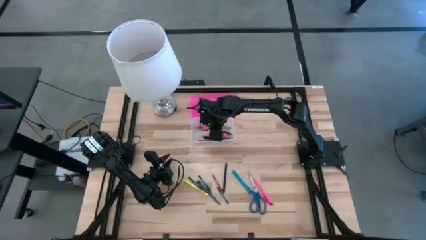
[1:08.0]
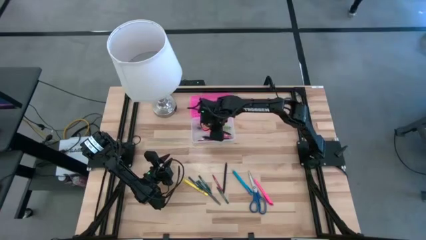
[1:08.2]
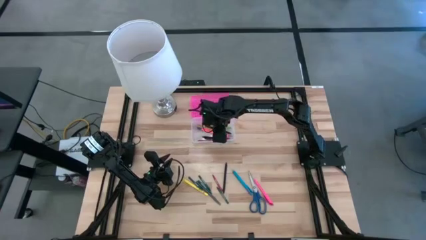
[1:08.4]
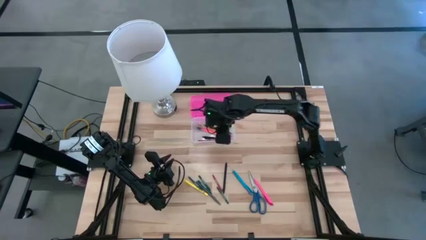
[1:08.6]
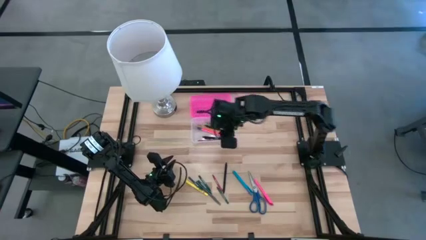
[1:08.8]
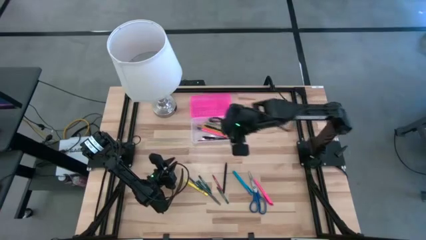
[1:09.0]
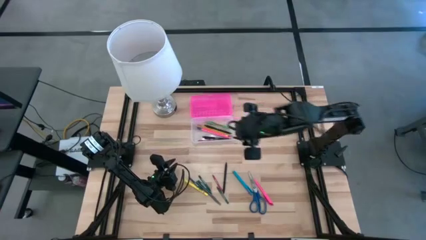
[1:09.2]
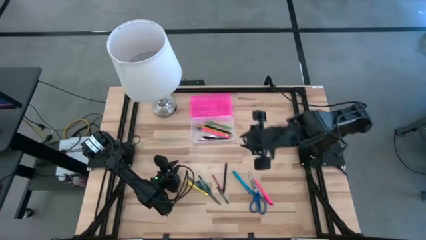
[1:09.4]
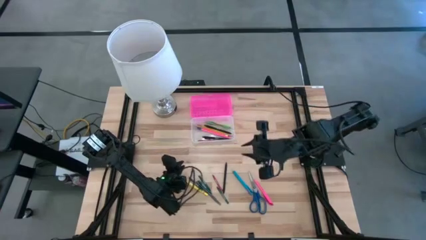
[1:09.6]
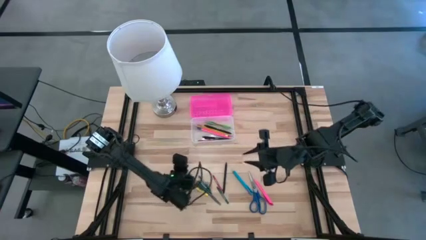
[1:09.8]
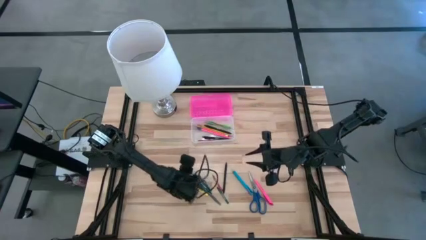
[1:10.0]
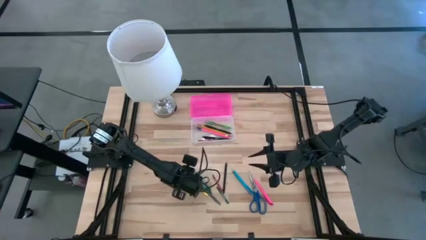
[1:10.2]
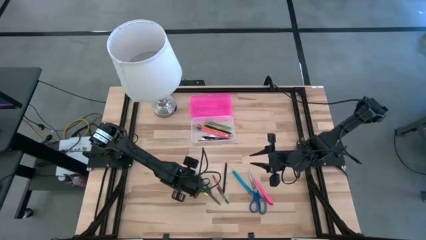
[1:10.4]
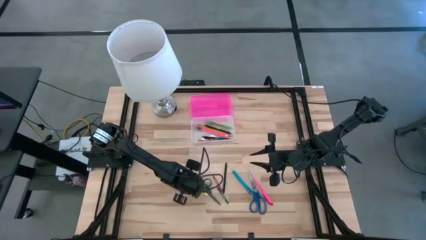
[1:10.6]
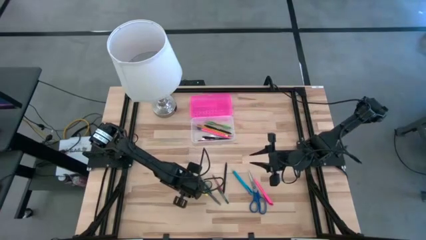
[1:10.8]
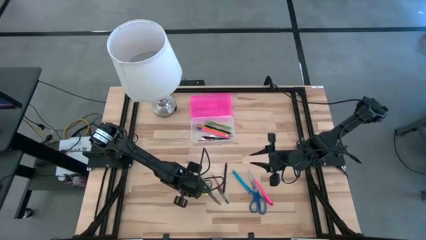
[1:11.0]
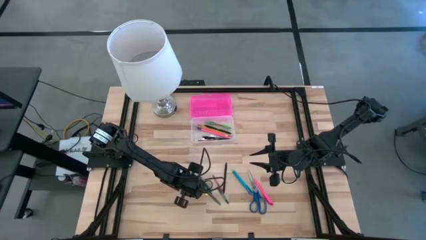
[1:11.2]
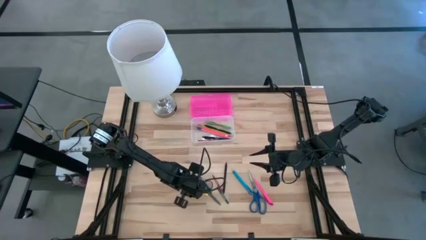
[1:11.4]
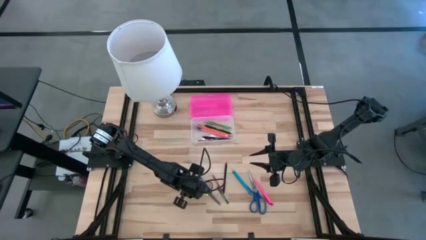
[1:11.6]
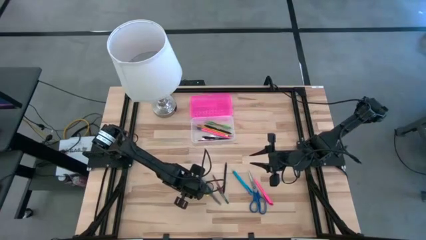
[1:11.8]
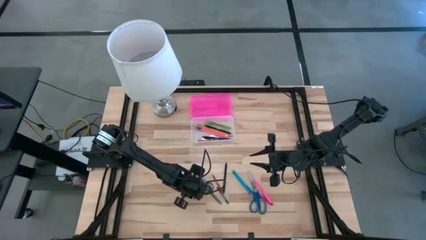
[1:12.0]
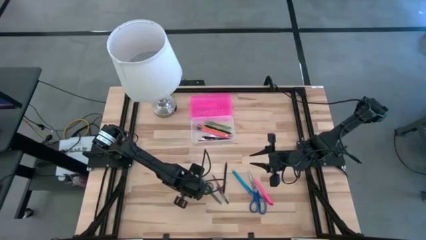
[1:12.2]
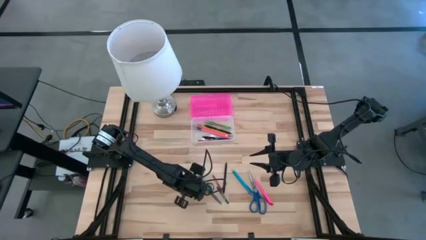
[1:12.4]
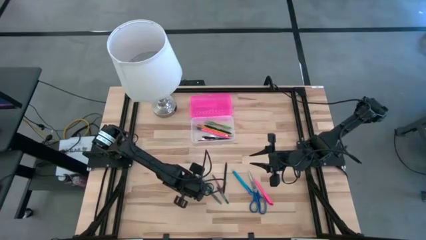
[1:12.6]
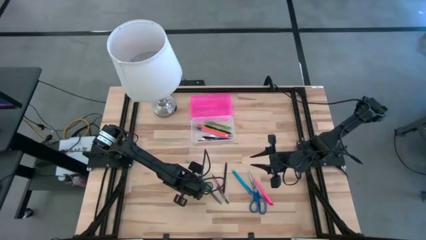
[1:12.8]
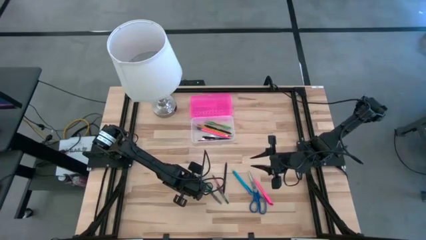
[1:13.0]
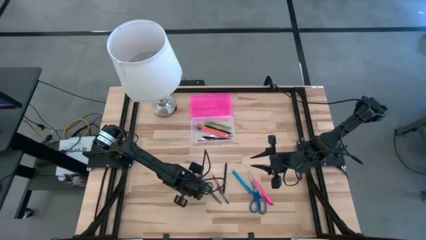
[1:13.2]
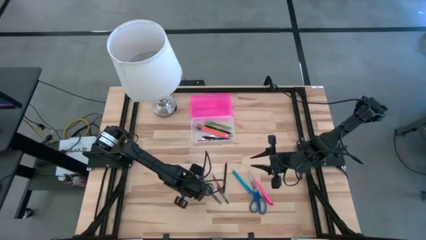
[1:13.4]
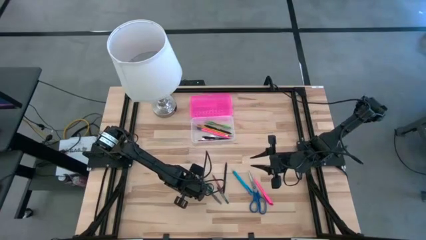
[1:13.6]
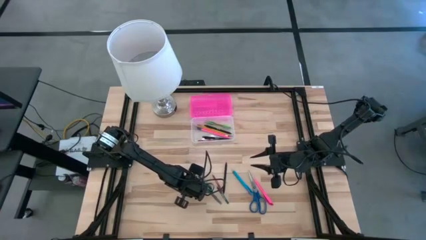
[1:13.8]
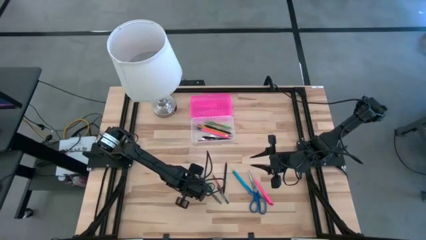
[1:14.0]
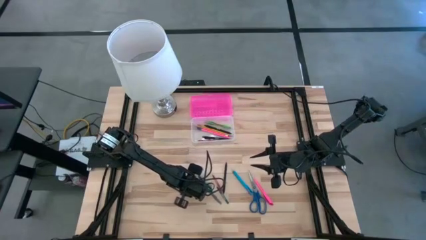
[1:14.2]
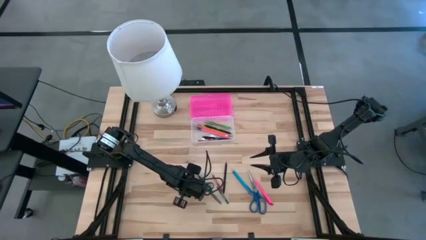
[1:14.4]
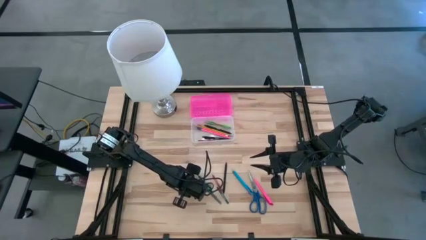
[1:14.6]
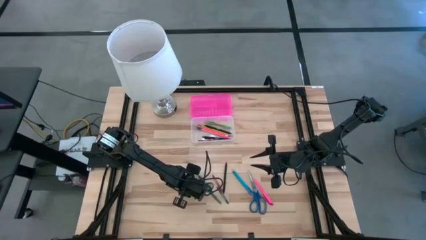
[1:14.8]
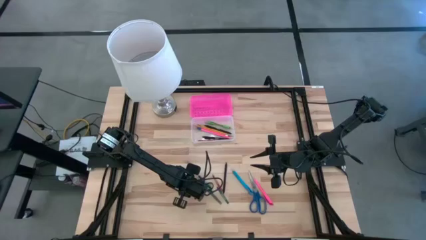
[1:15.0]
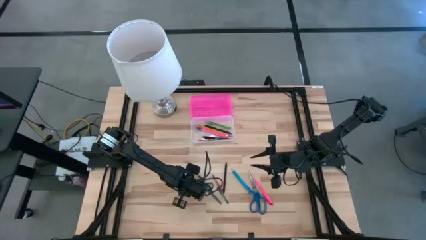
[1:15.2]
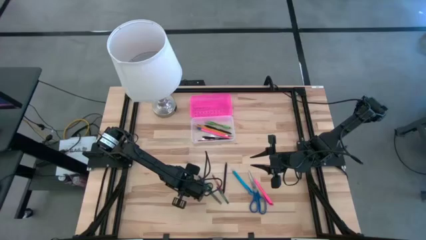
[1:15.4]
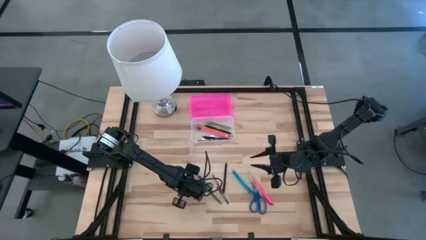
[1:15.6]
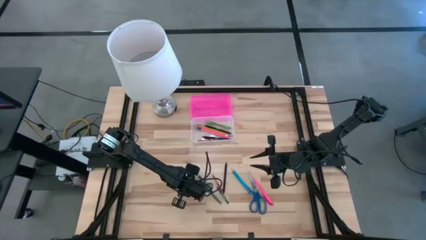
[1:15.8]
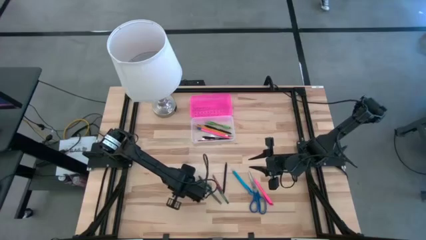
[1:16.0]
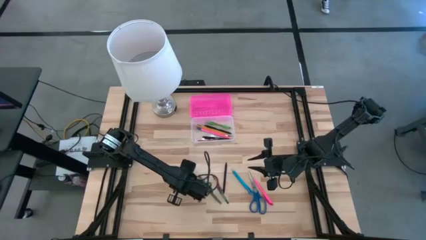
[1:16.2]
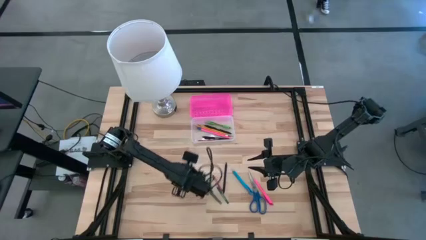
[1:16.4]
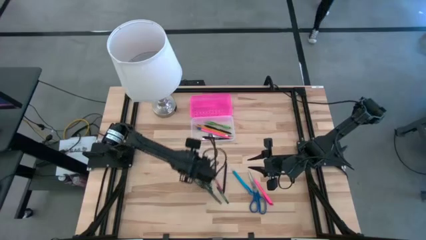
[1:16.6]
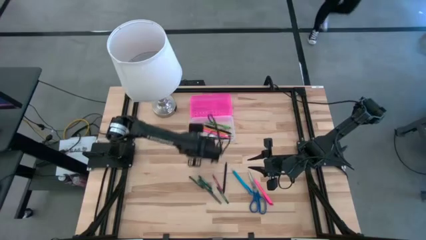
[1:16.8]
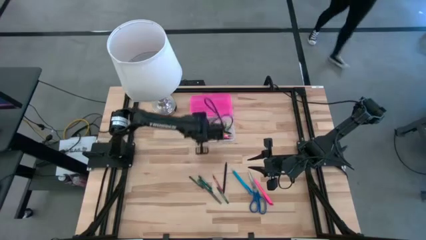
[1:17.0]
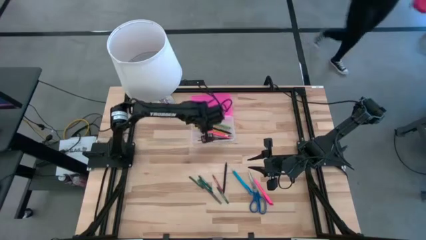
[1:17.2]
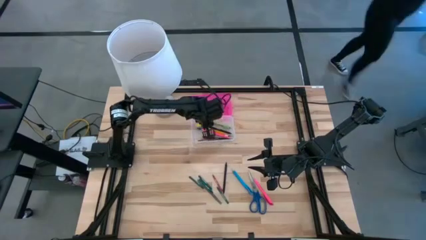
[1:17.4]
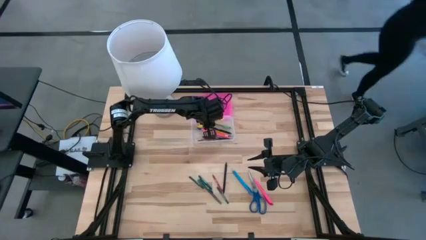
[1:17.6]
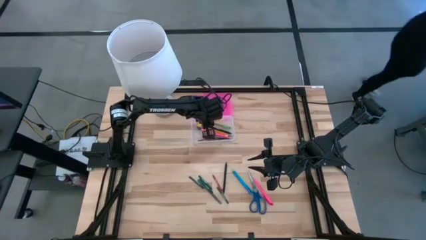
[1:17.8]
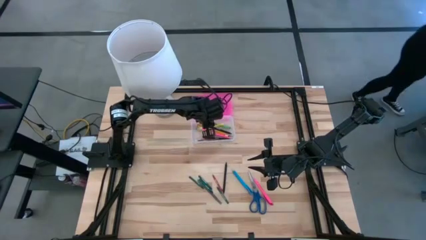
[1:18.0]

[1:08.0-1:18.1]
Task: Pick & place school supplies into a supply box
Put the yellow pen into the pink supply box

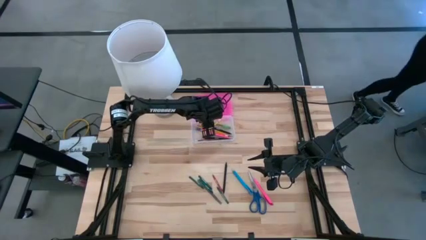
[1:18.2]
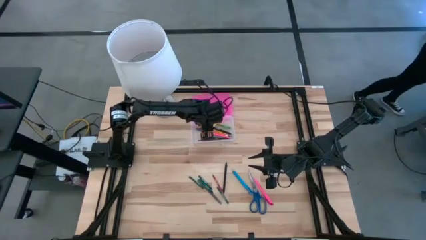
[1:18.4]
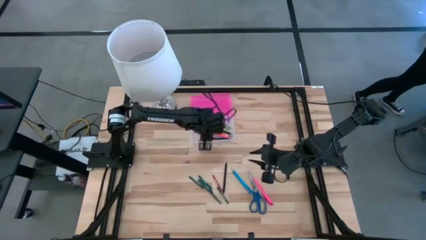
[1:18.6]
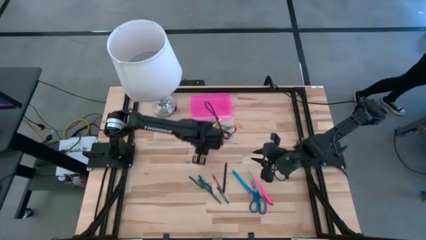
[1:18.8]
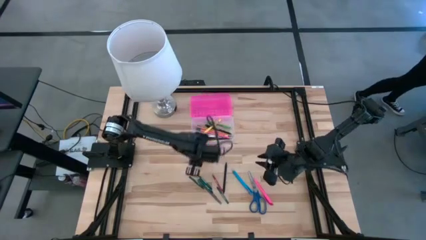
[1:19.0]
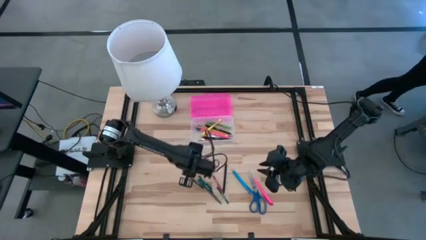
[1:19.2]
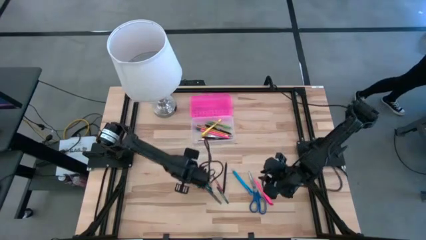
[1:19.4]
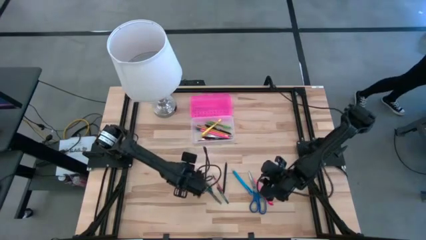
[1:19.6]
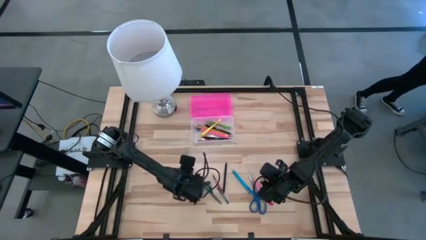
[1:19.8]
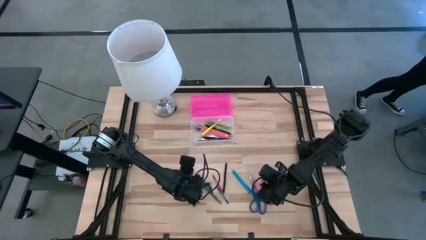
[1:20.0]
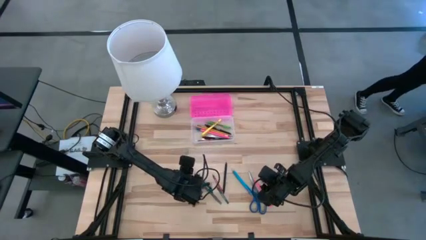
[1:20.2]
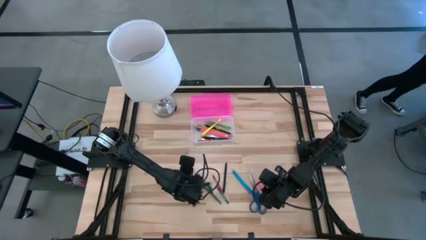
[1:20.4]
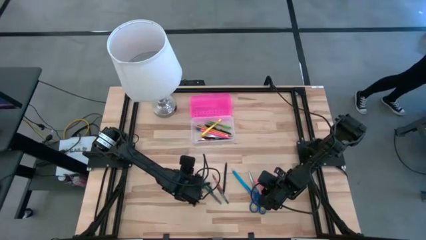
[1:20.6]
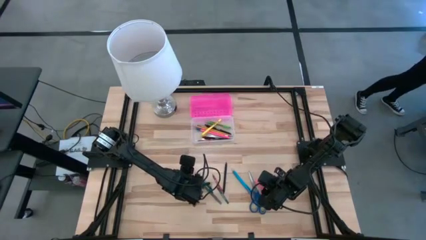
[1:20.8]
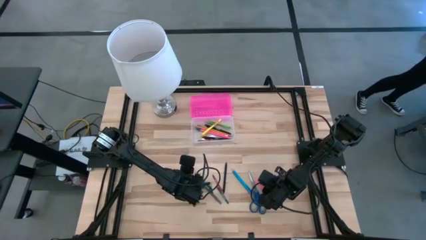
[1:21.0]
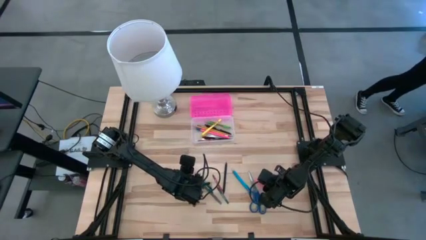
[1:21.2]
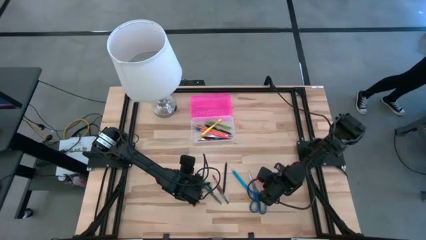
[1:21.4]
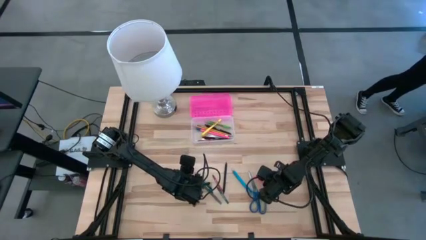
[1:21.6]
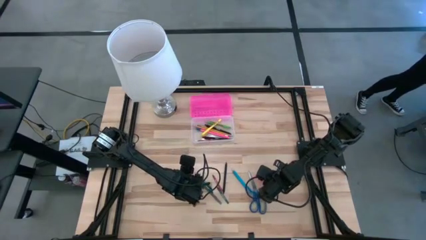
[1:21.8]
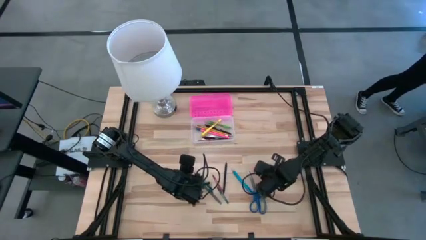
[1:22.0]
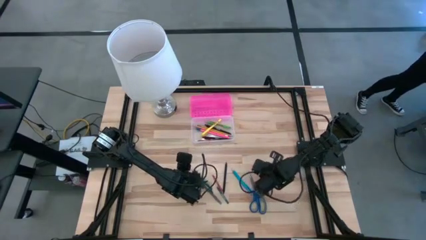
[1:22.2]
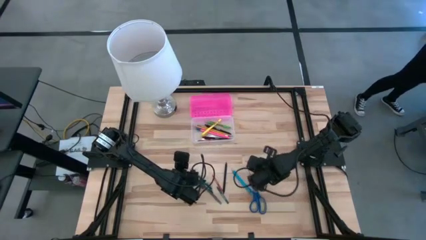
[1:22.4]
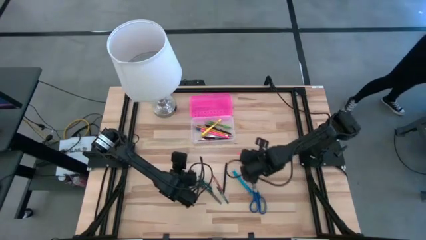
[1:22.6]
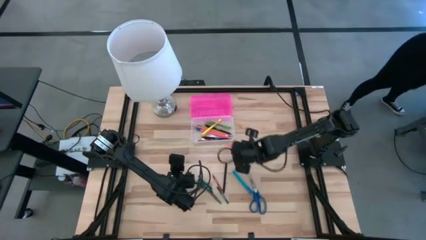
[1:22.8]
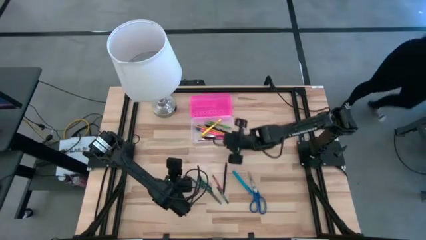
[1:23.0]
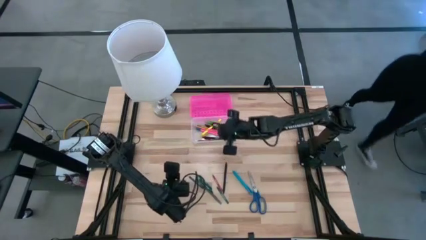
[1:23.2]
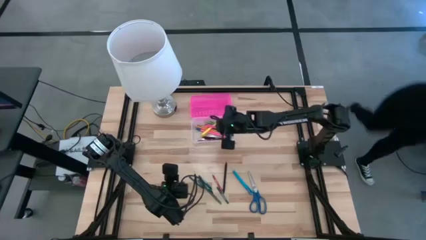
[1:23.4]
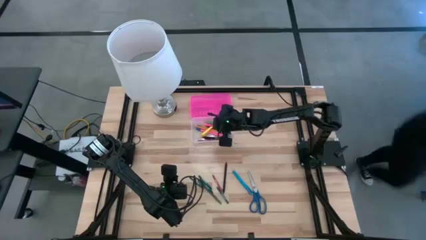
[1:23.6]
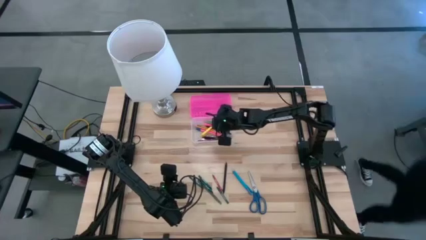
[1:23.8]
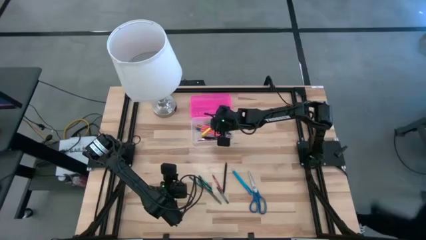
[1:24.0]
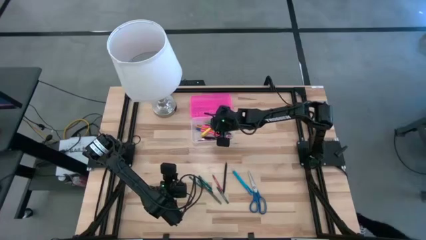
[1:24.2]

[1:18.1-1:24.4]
Put the pink pen into the pink supply box
